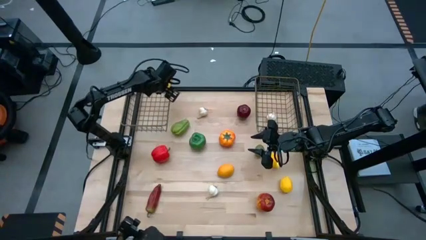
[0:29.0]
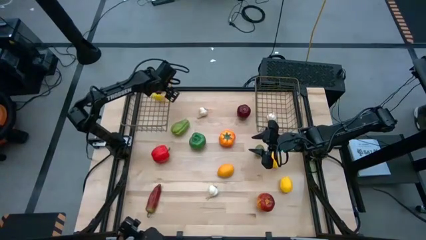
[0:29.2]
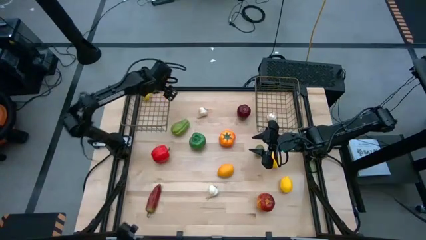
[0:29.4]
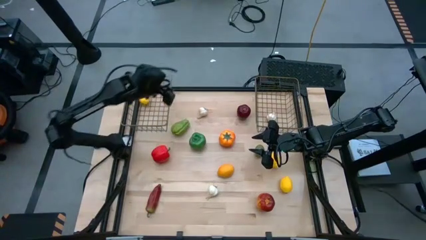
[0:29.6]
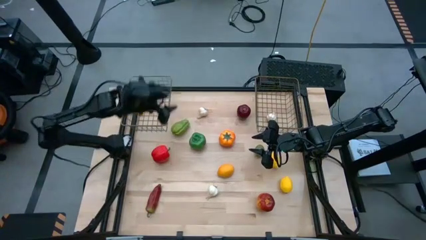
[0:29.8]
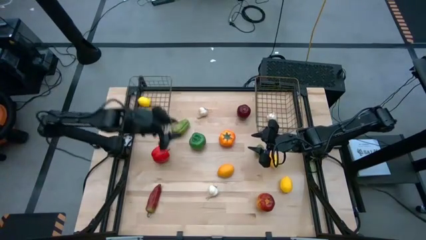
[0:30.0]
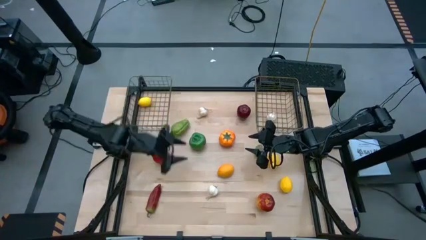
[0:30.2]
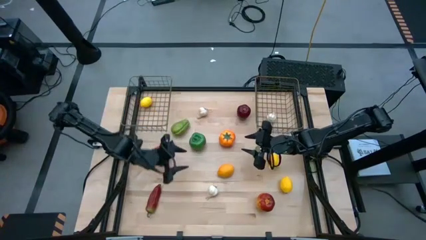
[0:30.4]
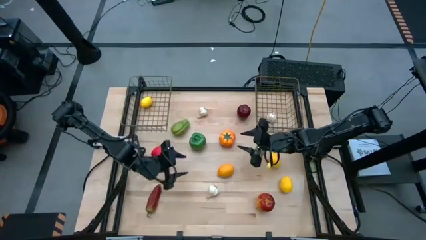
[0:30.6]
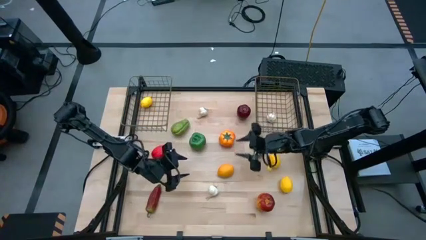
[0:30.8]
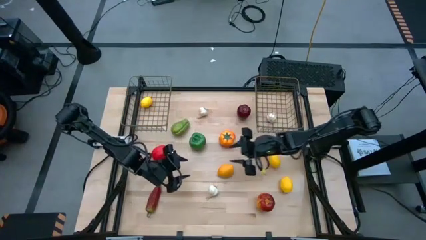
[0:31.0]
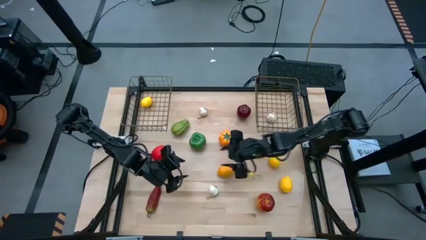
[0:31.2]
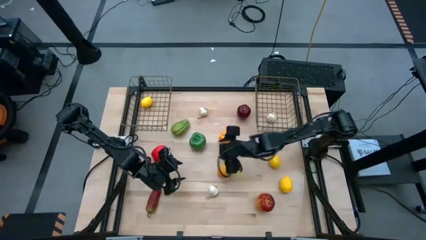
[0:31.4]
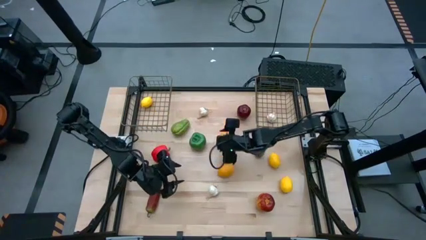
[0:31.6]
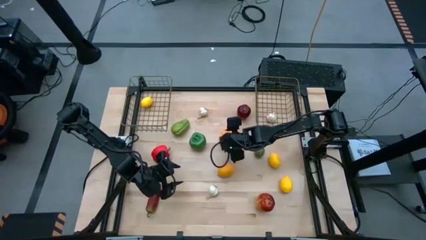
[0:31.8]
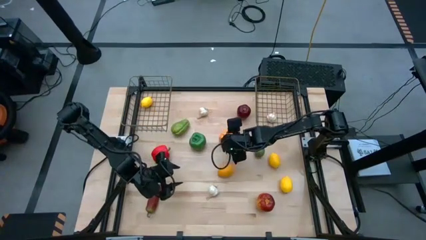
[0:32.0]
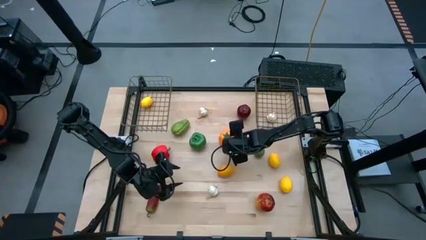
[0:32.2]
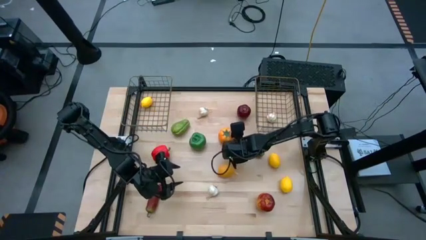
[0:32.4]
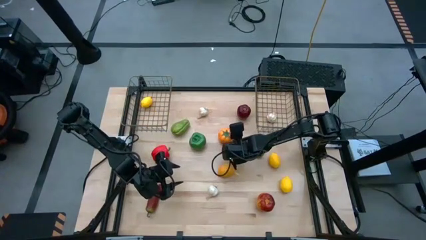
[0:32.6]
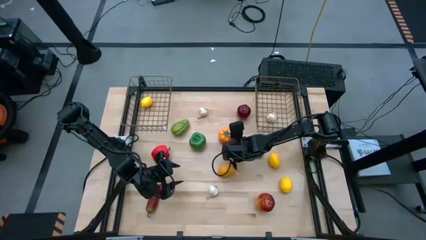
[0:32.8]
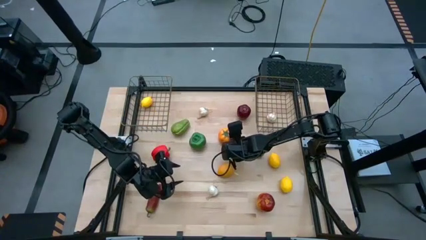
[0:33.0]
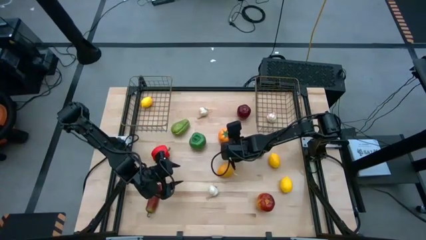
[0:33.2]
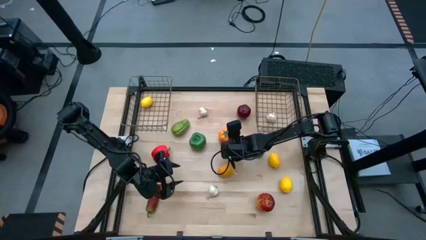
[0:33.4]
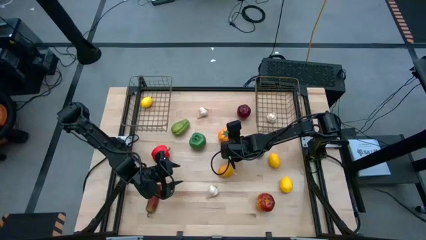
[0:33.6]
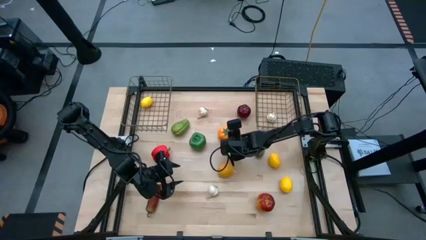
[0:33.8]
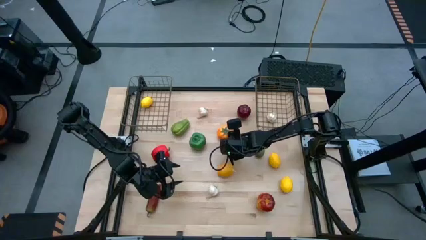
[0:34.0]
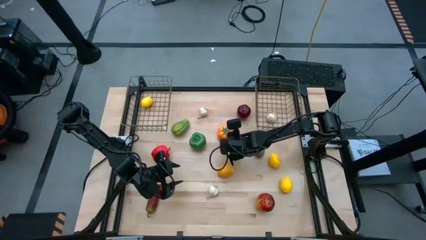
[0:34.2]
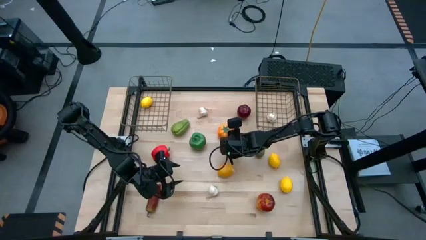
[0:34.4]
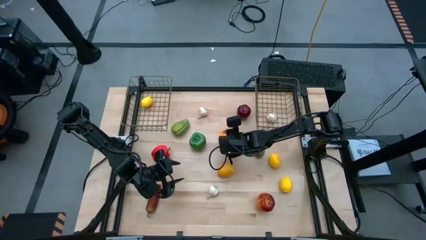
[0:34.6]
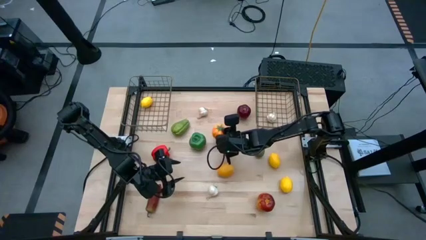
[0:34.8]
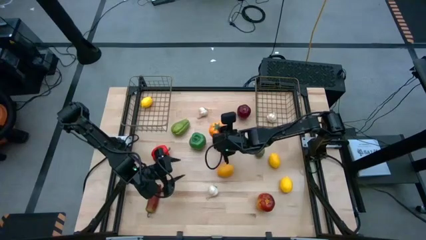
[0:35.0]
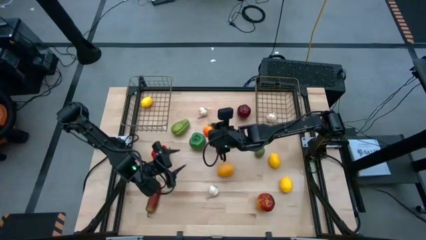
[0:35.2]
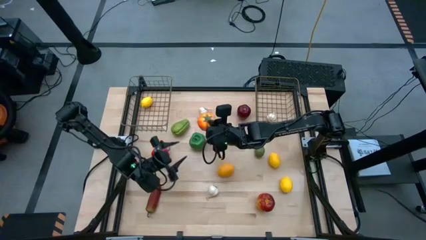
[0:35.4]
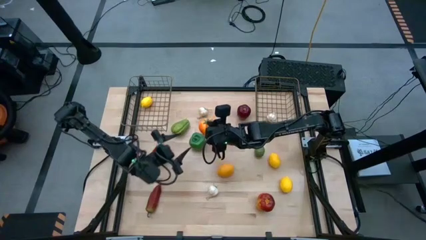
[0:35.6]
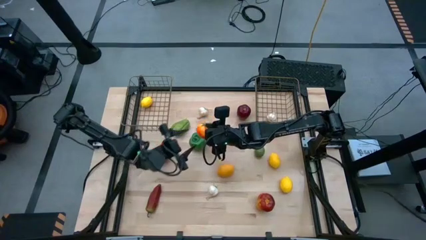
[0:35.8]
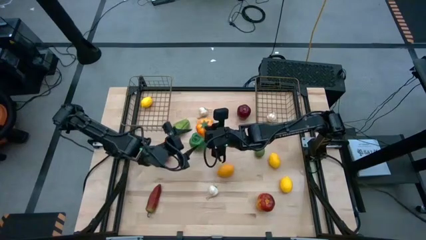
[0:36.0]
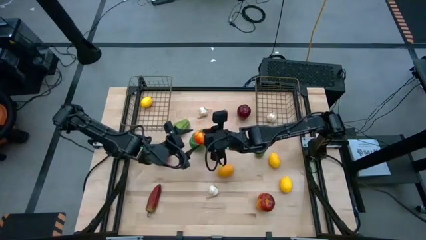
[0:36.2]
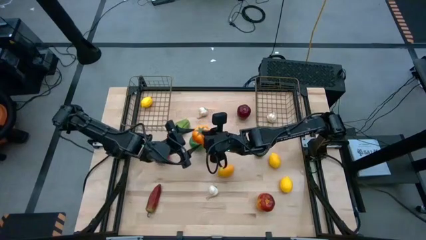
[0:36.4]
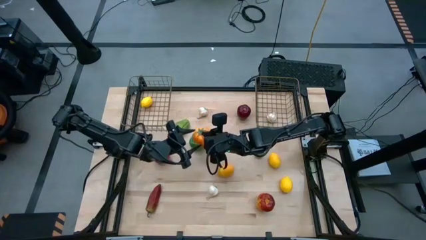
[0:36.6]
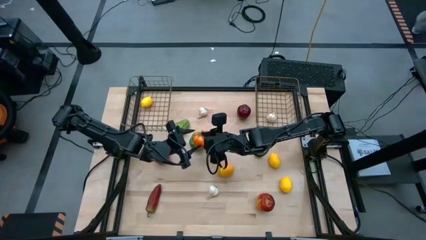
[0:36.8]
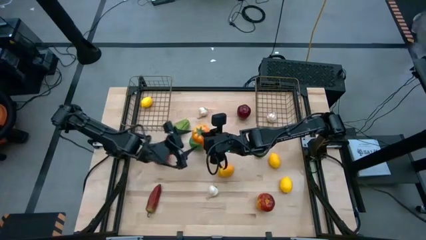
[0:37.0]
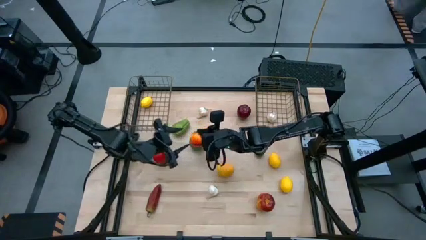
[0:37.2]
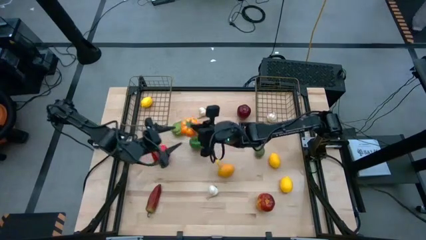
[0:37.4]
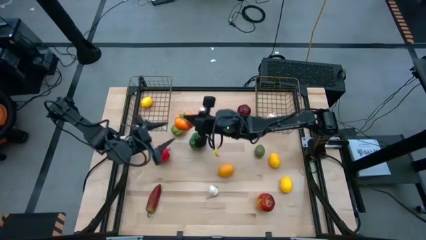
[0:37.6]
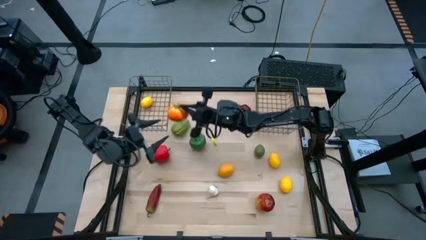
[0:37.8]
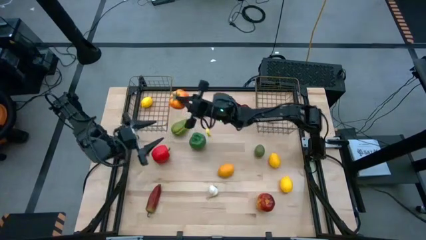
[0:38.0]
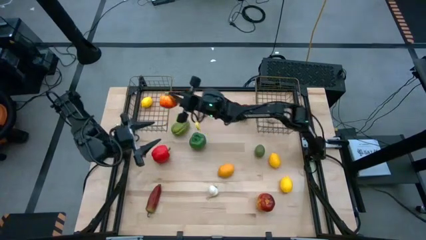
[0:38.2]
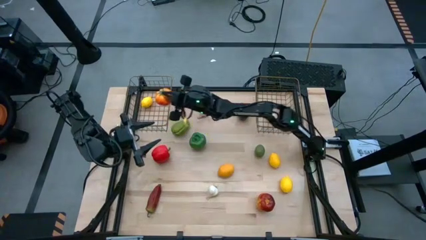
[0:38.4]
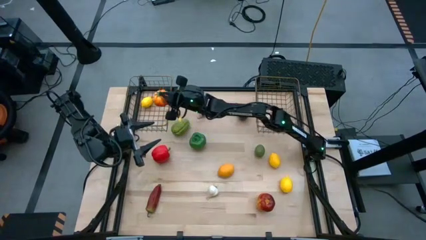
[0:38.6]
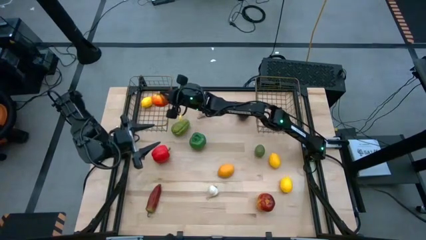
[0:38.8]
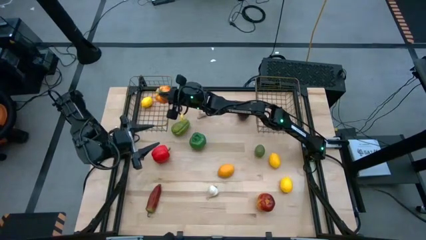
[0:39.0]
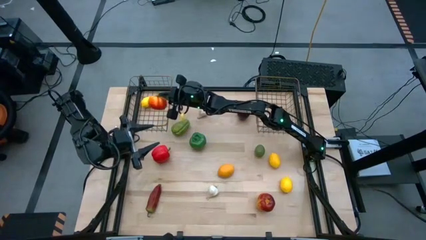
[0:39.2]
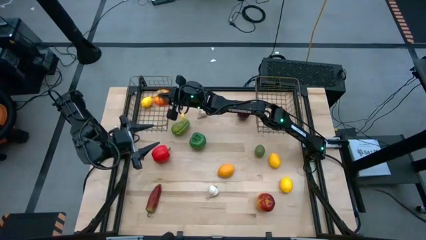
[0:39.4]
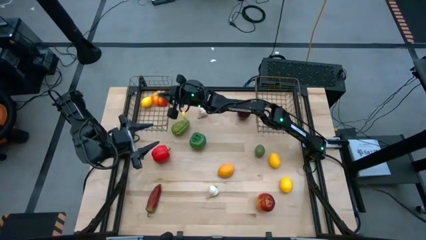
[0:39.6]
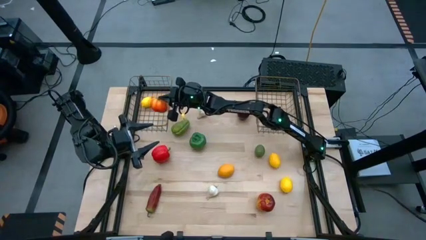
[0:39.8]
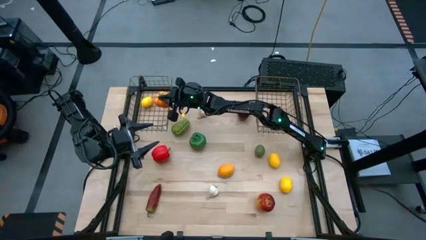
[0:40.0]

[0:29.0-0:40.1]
Task: Sort produce into baskets
Put the tomato into the left wire basket

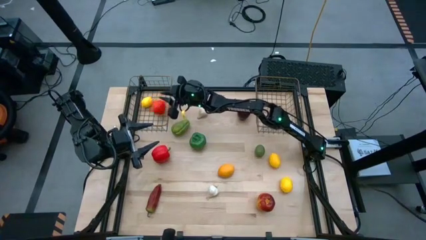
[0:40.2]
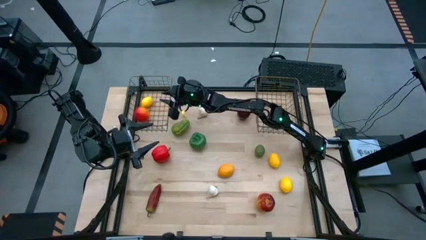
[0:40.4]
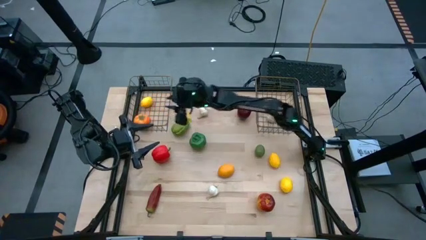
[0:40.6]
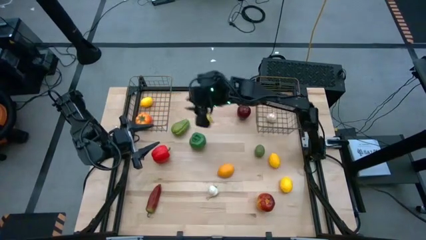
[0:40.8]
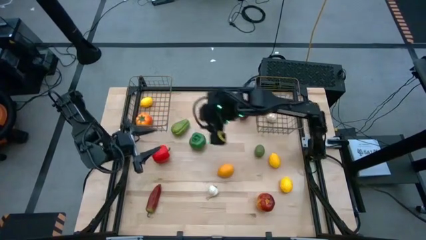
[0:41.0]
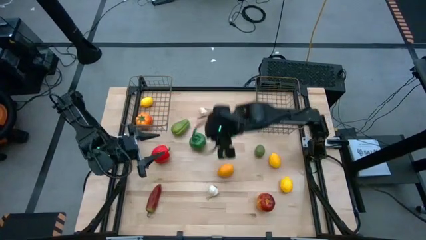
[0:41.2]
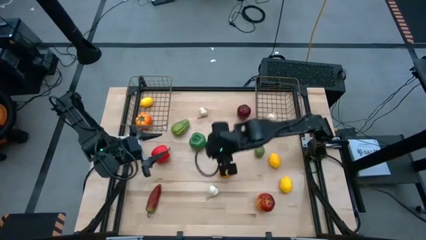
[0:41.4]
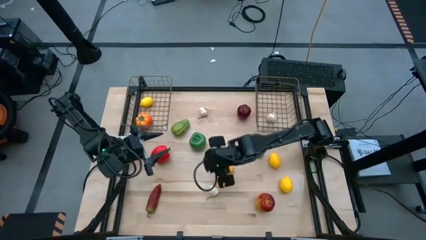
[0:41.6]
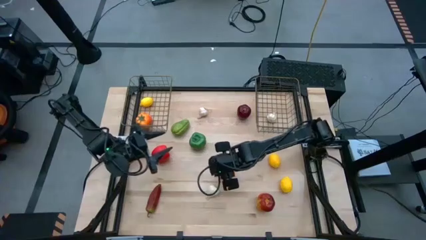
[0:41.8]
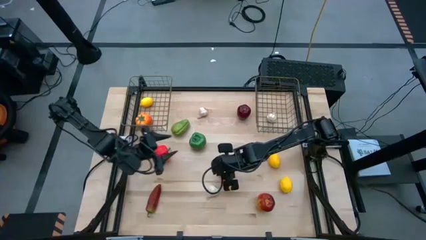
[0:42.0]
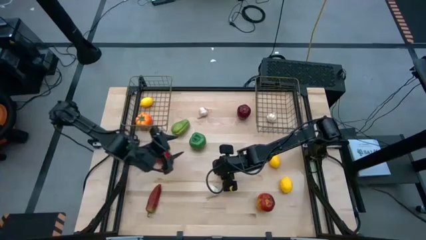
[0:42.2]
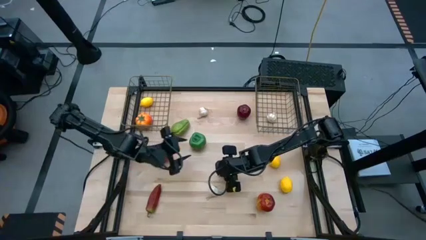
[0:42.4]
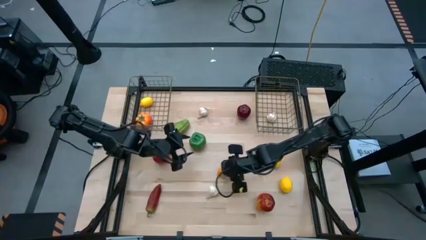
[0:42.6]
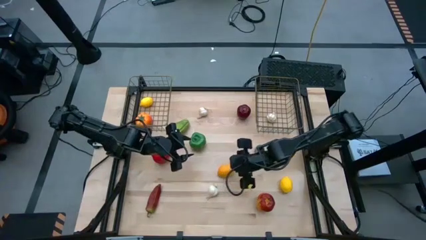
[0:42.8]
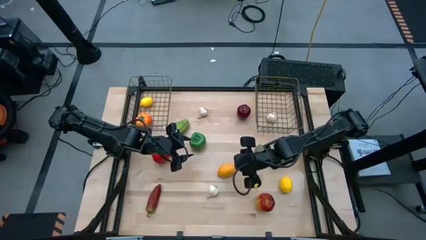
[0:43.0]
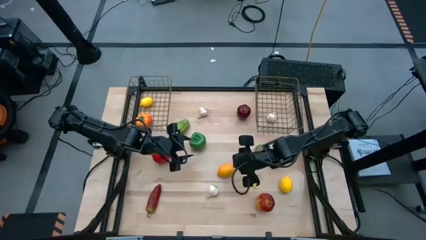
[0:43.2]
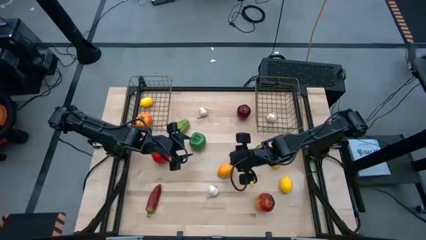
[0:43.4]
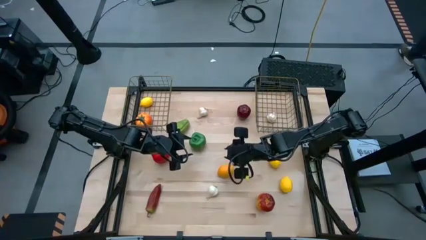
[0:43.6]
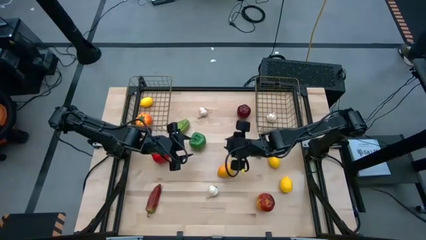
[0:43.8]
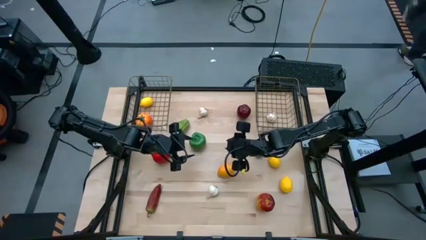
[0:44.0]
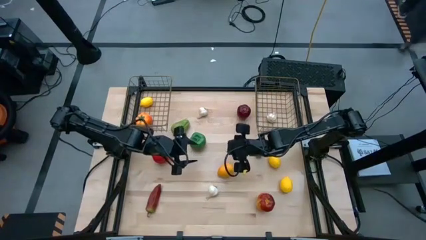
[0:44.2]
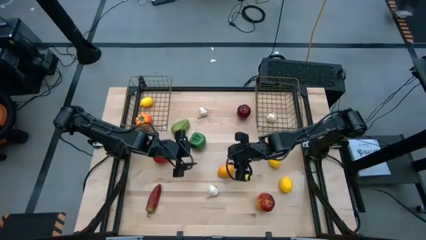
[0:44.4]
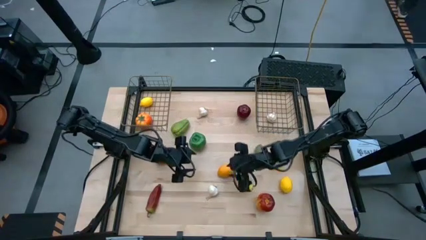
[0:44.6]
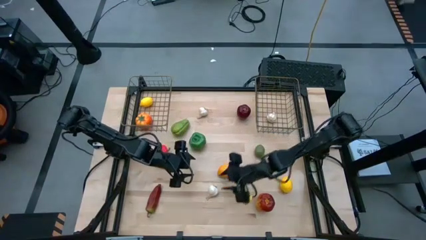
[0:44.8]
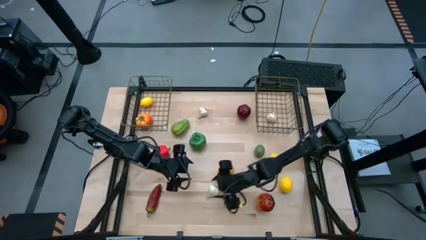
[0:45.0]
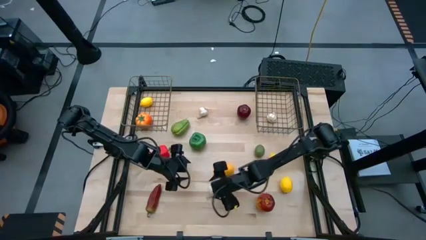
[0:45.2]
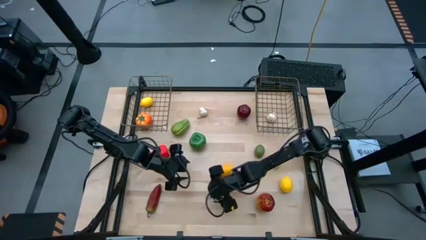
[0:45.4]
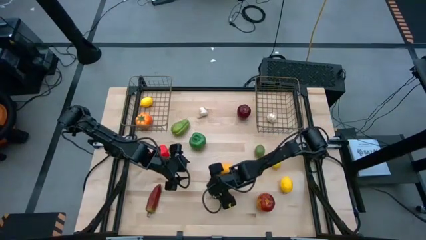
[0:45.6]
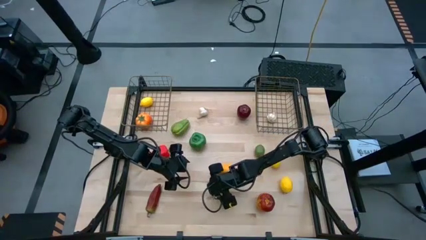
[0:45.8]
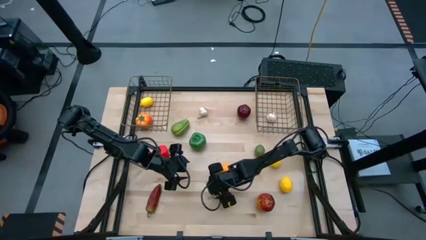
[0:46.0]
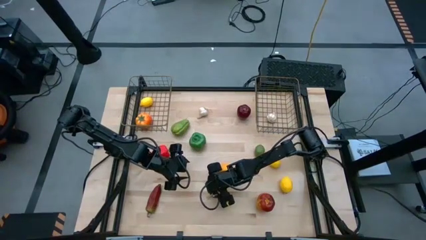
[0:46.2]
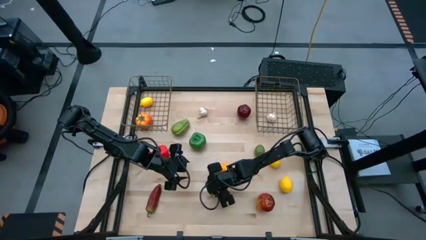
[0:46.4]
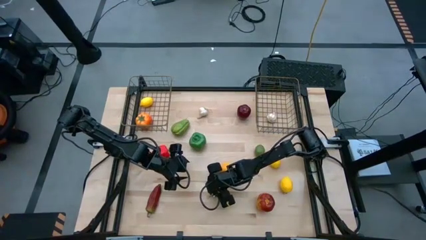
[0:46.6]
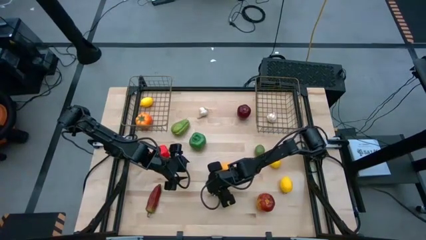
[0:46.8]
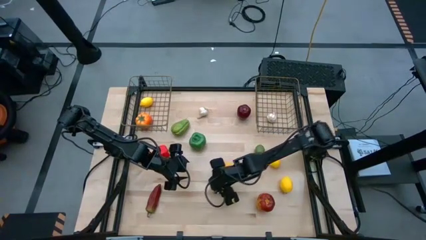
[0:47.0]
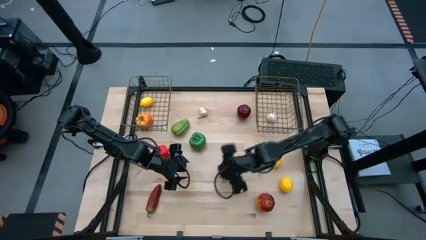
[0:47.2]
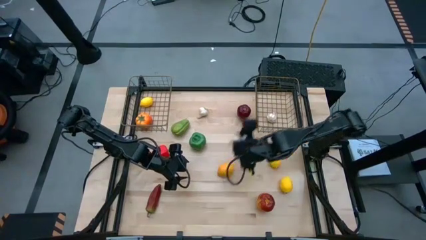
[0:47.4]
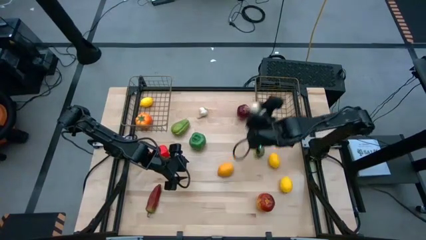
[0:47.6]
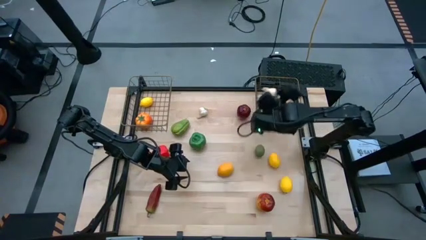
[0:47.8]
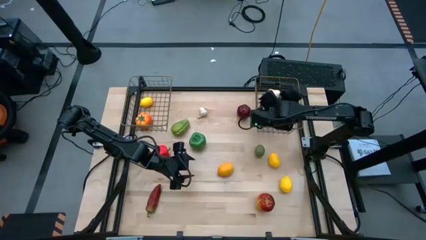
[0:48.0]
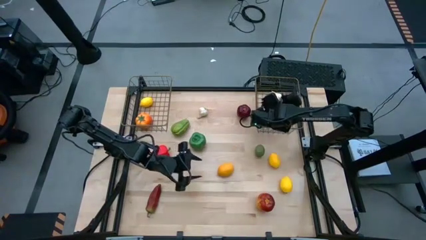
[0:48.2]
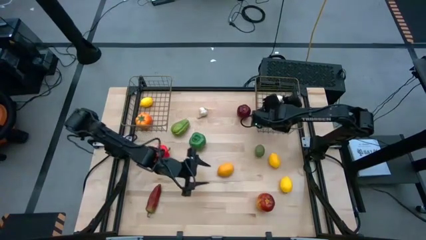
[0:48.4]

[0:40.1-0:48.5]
Put the bottom garlic into the right wire basket
